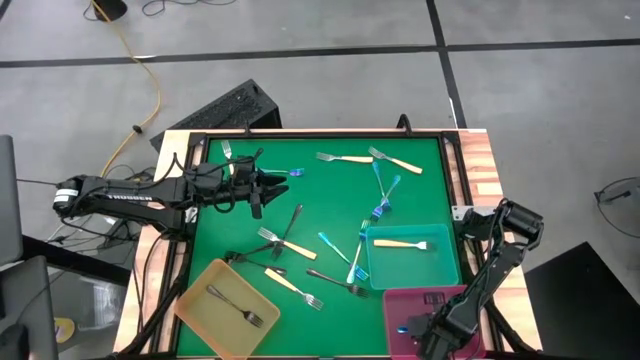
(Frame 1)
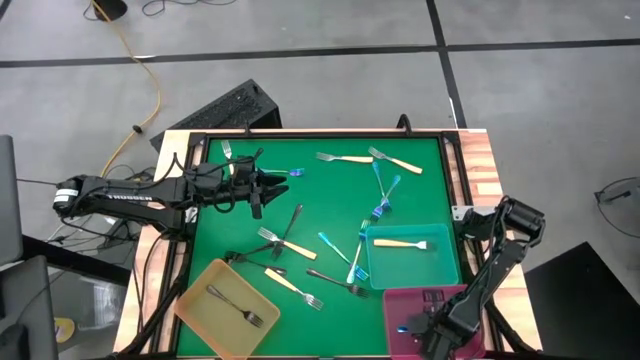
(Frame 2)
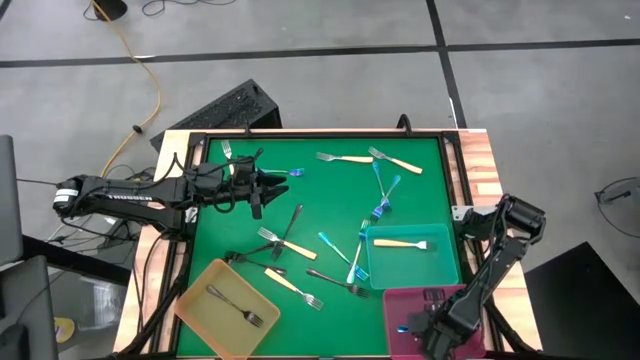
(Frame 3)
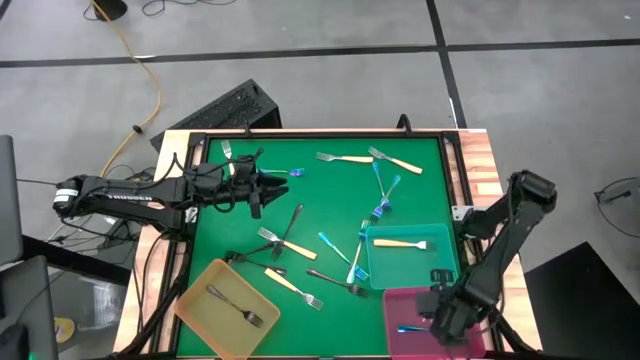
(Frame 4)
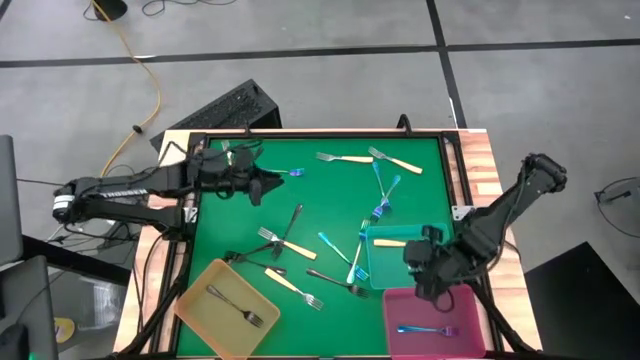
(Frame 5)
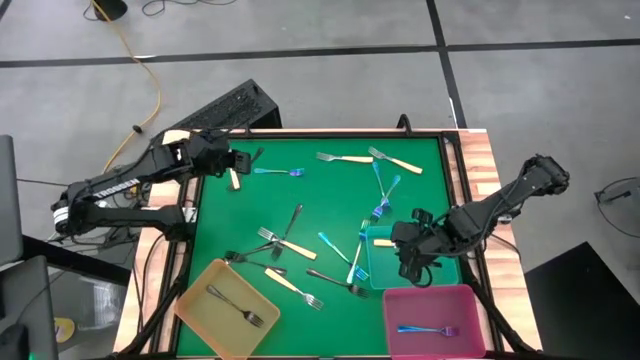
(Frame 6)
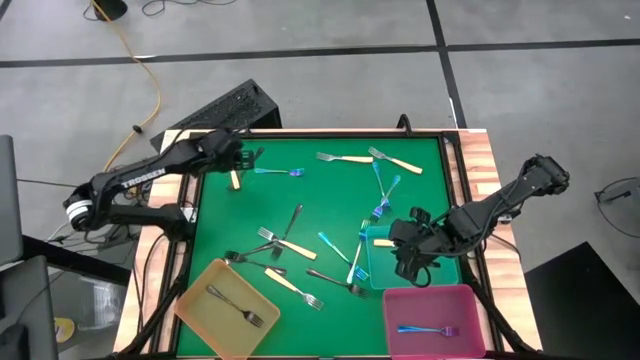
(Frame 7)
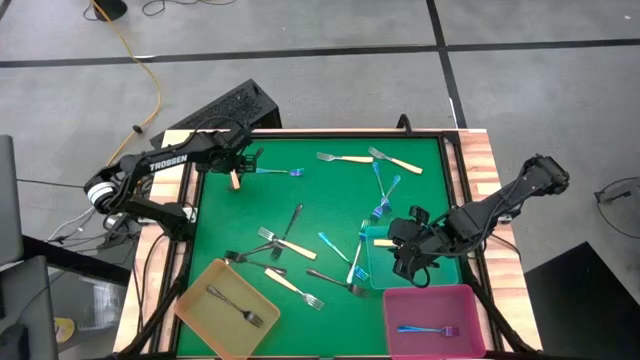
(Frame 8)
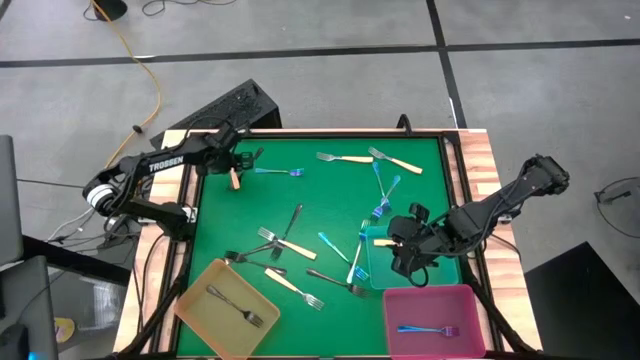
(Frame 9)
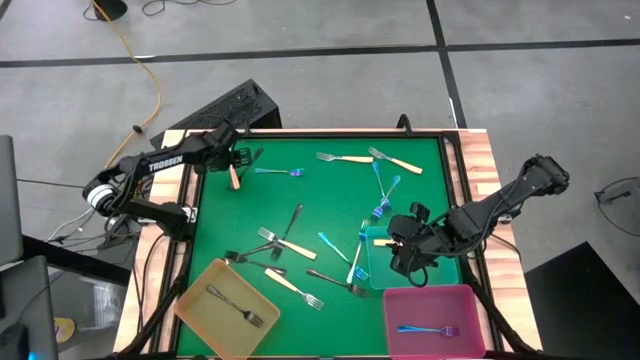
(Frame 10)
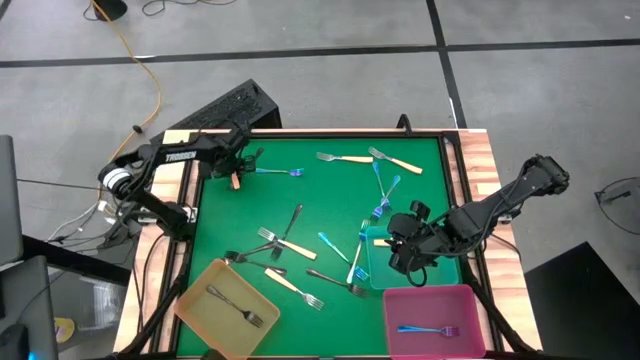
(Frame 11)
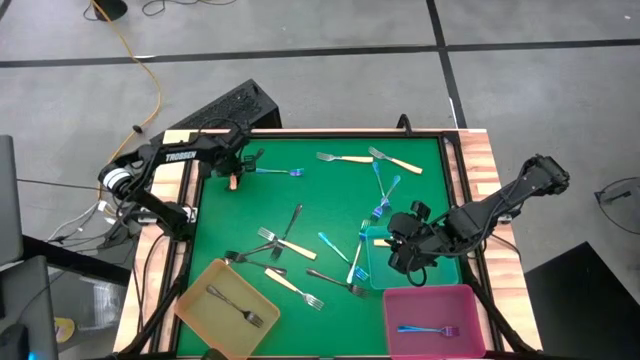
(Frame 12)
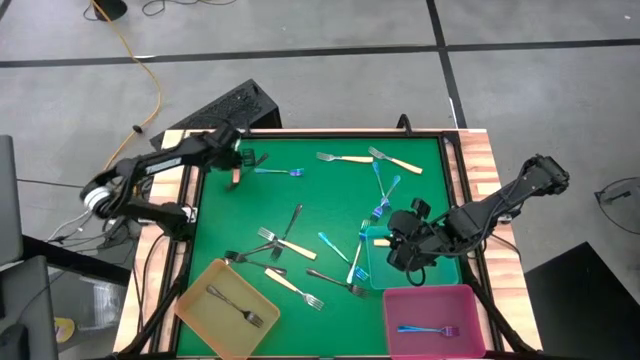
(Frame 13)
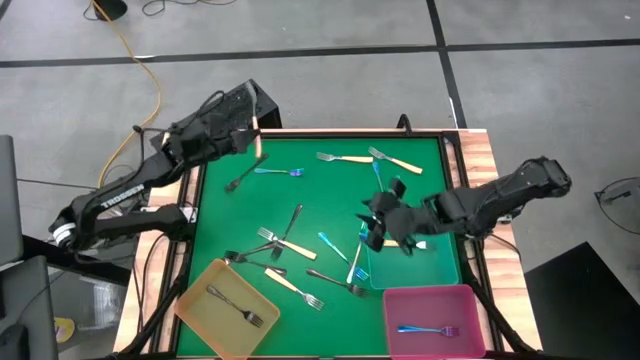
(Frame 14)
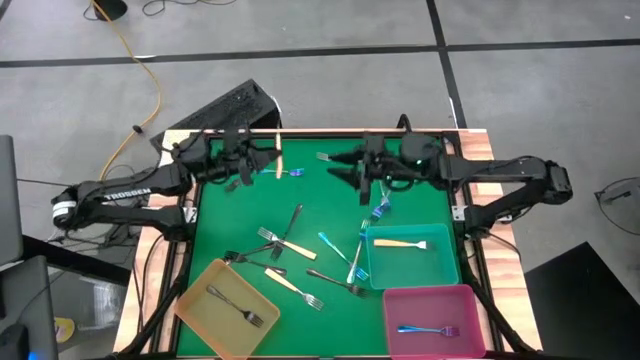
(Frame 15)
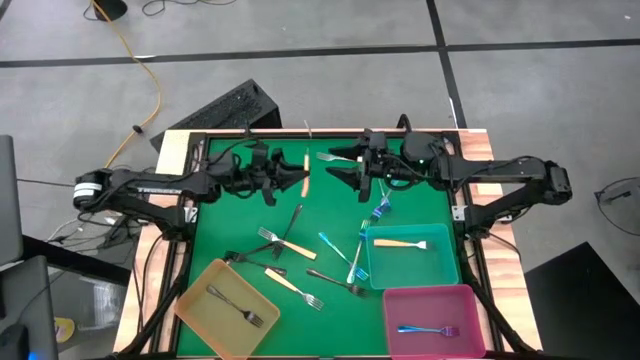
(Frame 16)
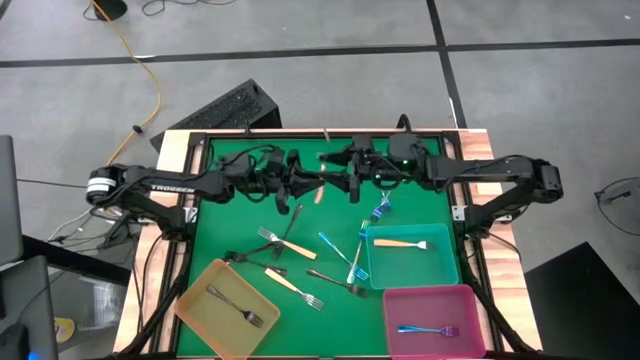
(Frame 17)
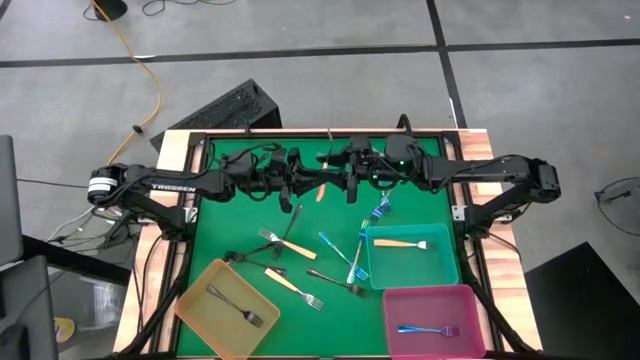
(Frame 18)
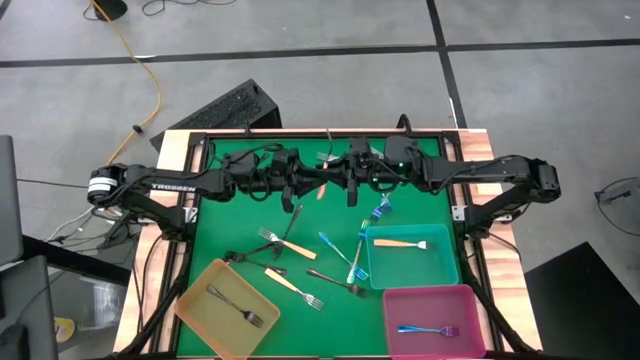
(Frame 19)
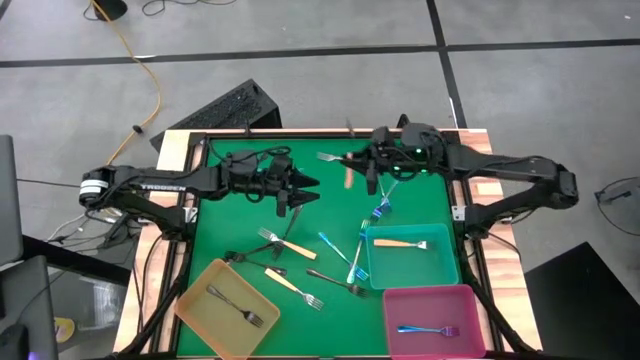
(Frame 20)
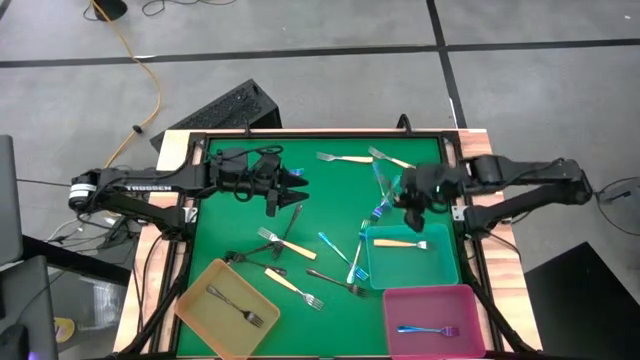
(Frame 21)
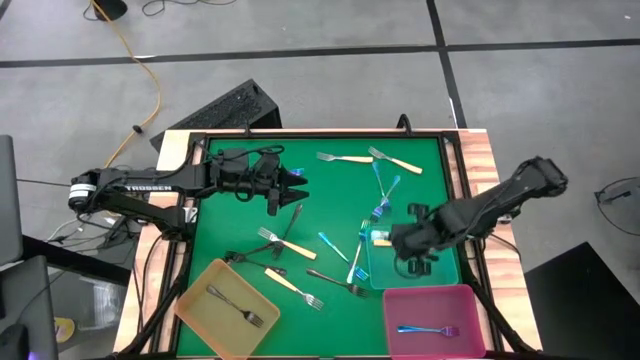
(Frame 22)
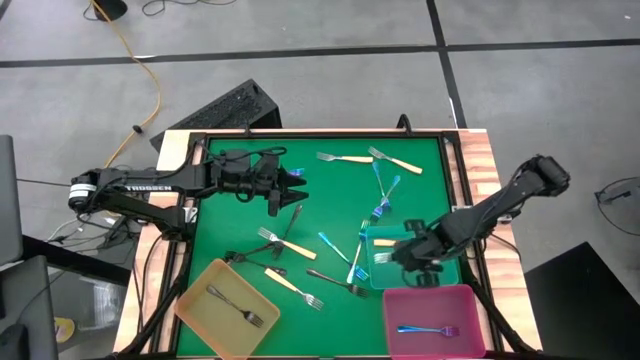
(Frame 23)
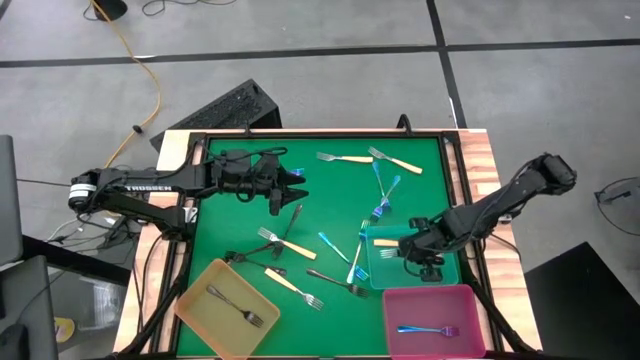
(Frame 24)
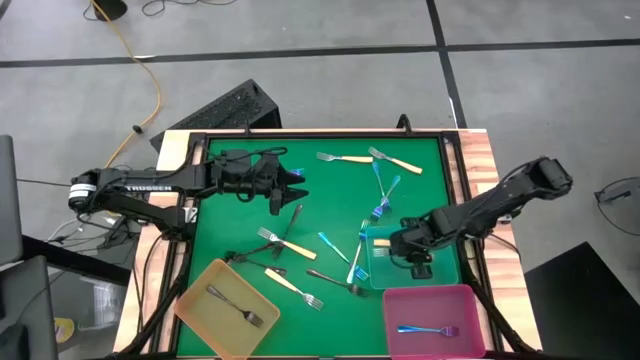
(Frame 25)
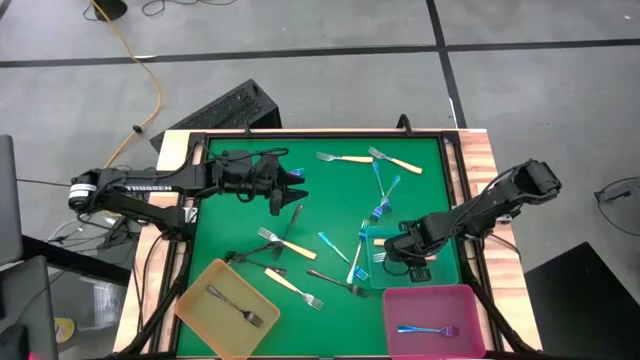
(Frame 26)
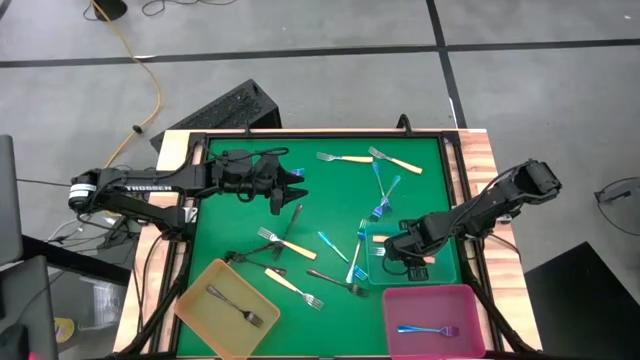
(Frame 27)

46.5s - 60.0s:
Task: Sort silverware by color (type)
Put the yellow fork into the green bin

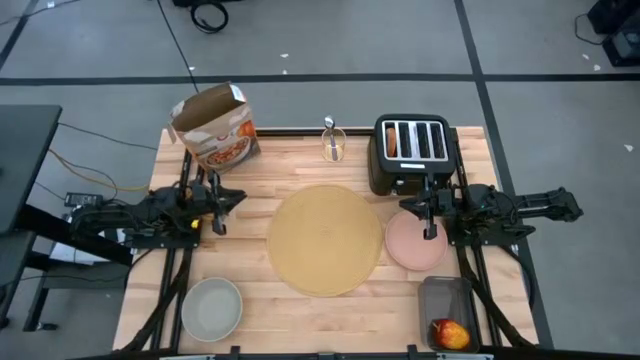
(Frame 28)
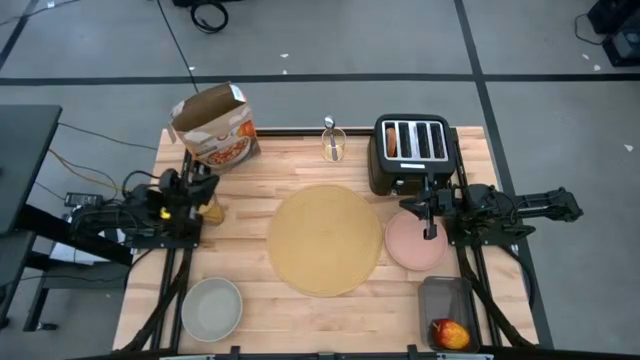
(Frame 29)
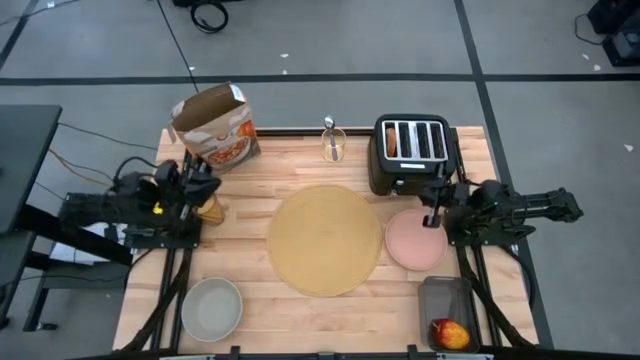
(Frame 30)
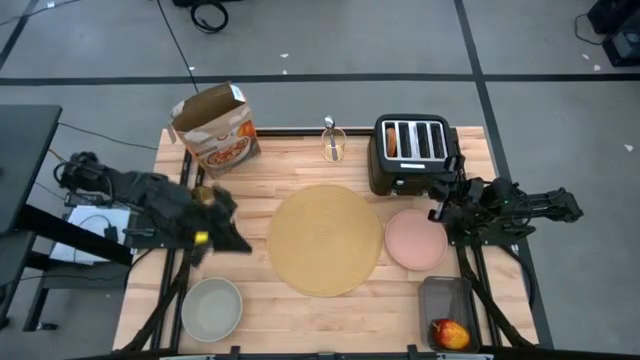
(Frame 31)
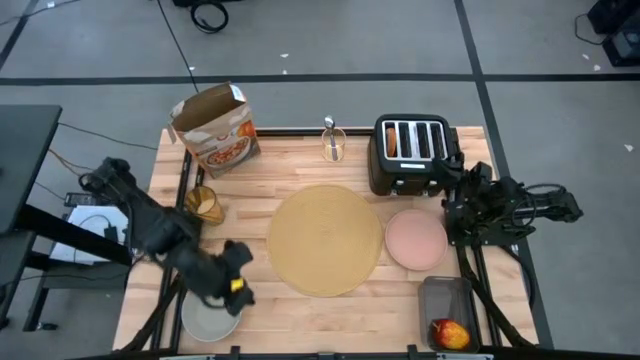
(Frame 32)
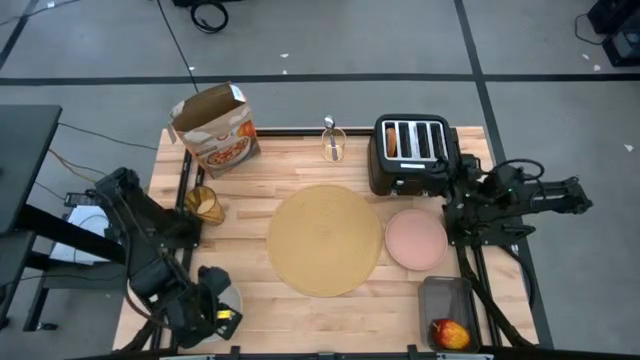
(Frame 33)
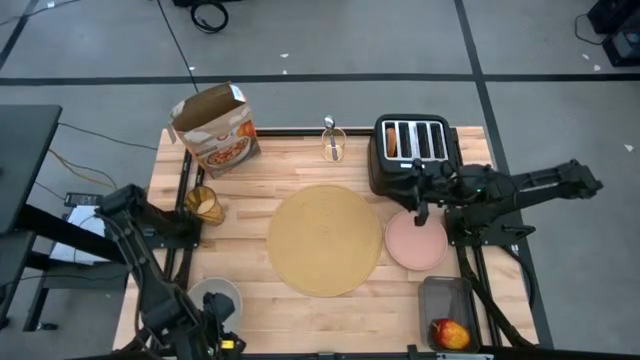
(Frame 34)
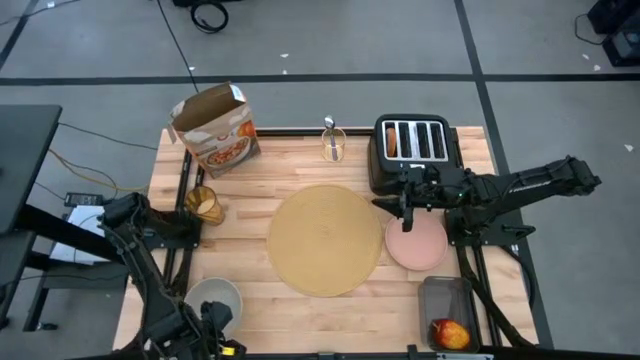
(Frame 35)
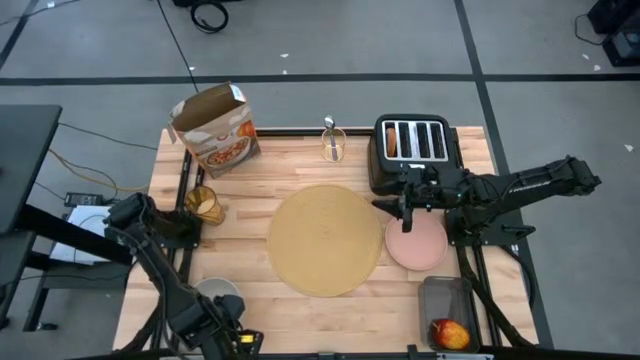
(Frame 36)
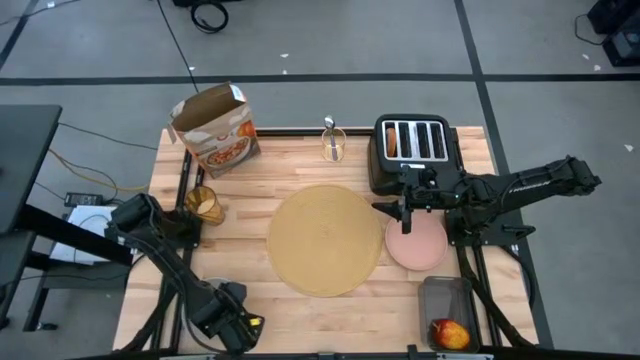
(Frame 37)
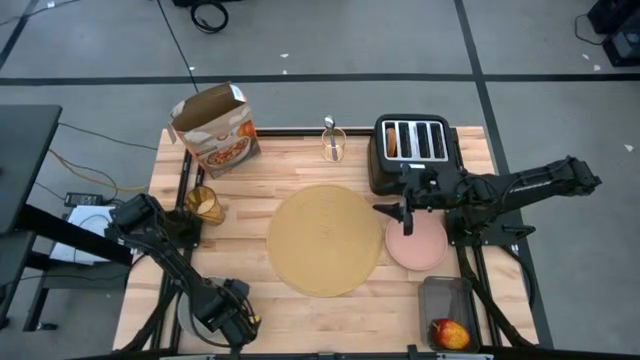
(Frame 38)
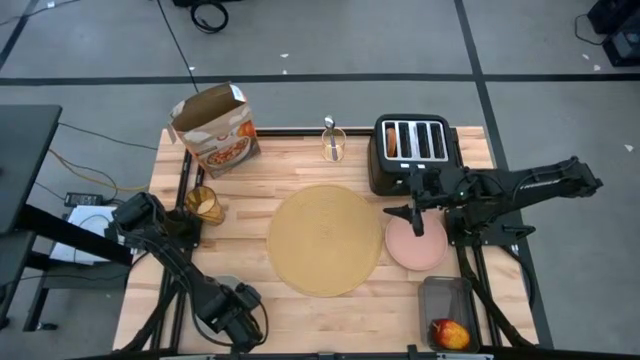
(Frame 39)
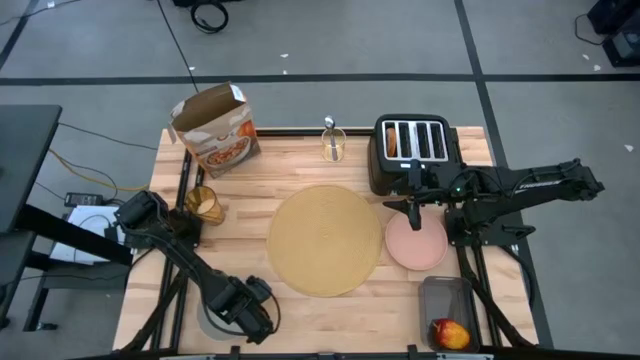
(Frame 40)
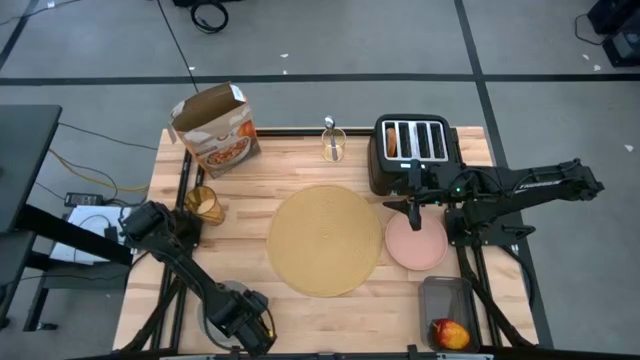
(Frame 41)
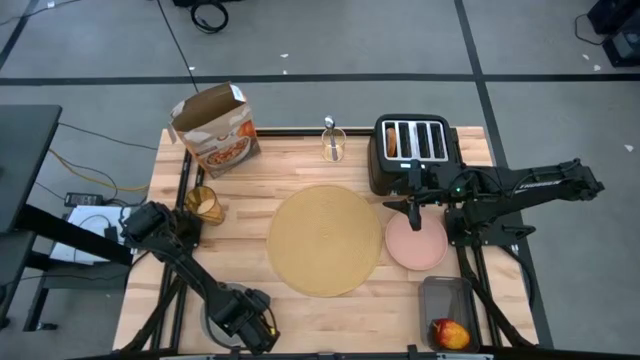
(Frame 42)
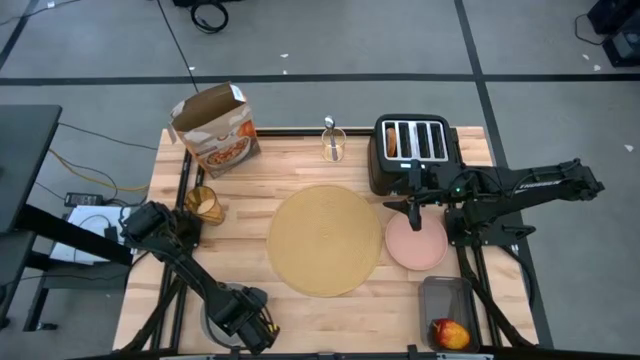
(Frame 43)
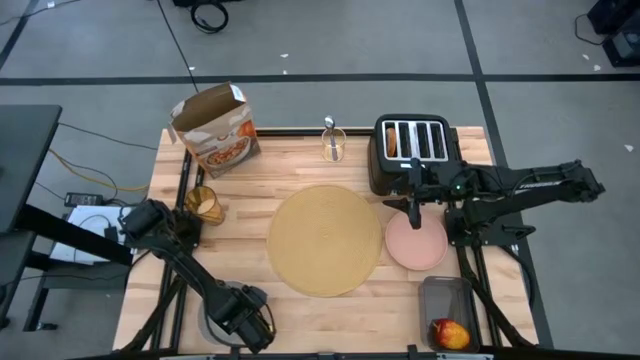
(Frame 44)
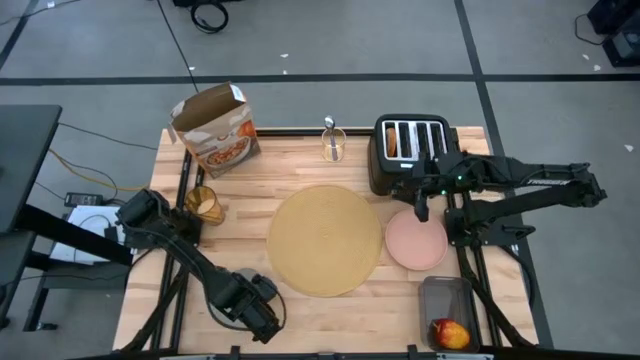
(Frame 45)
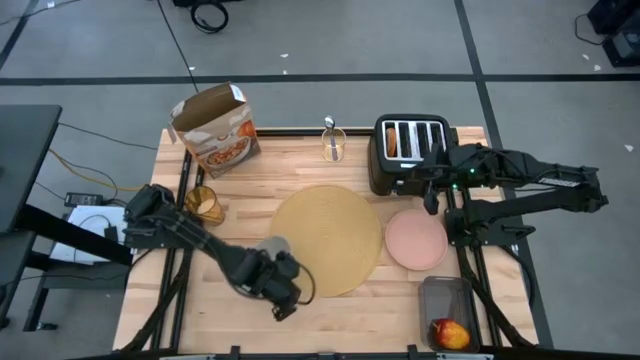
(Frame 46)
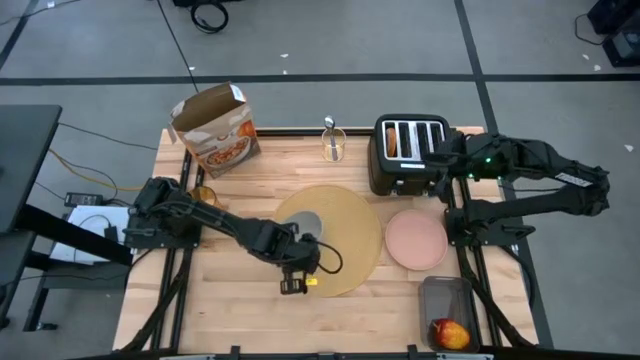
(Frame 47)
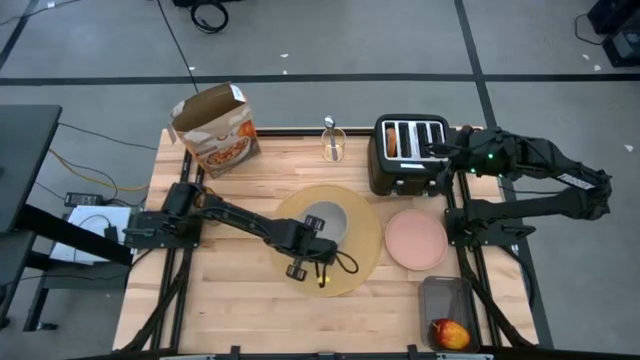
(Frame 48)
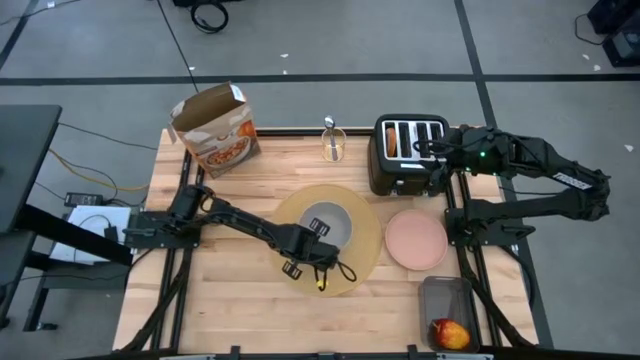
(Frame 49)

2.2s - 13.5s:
Task: Arrange a breakfast setting
Put the gray bowl on the table mat
